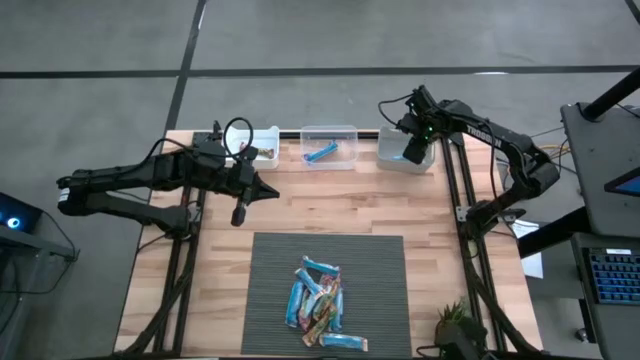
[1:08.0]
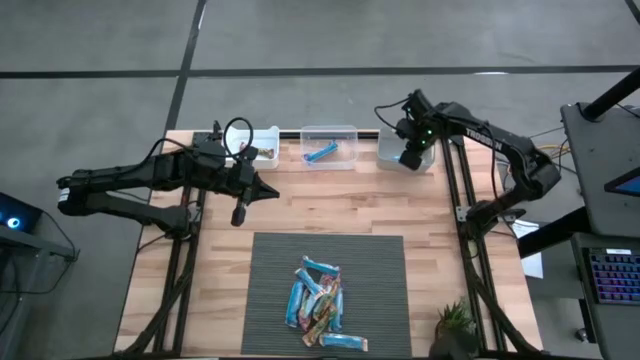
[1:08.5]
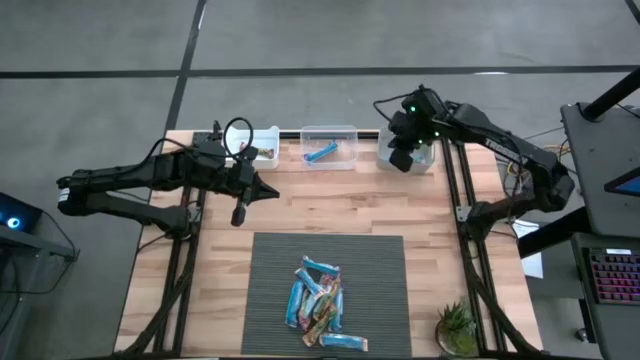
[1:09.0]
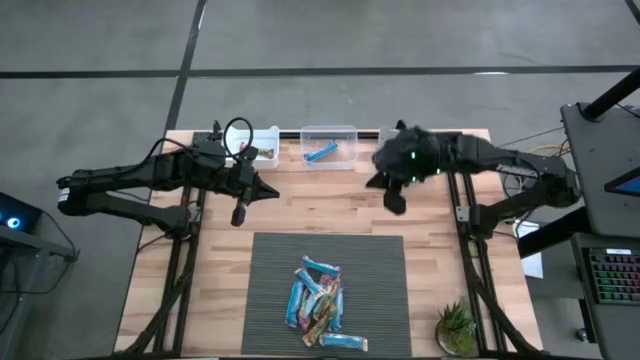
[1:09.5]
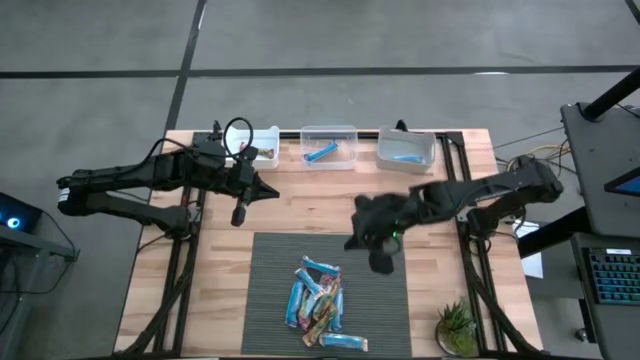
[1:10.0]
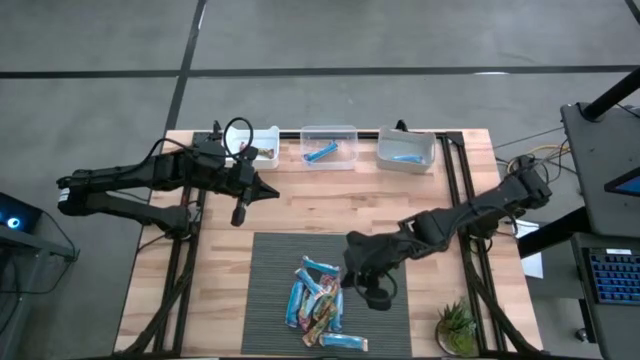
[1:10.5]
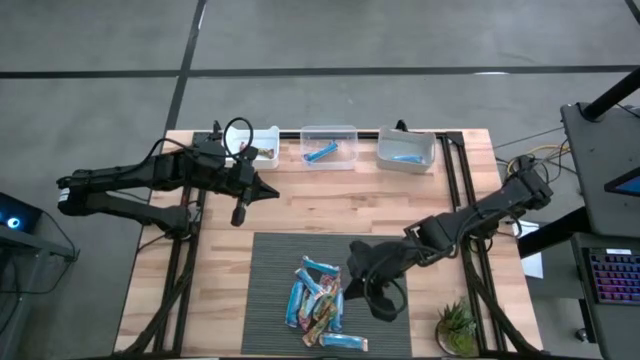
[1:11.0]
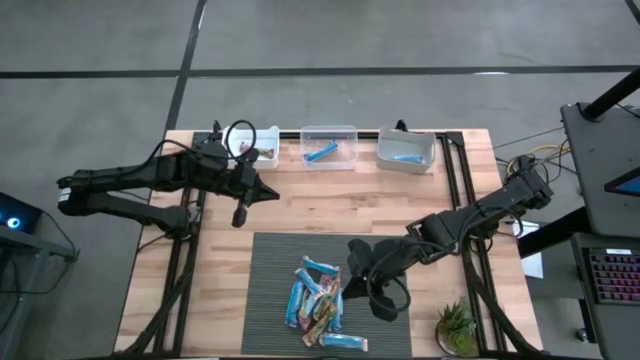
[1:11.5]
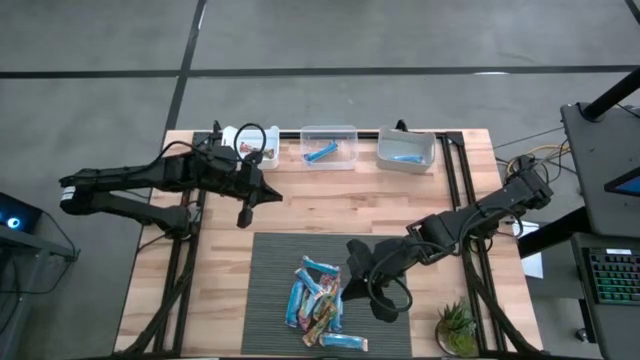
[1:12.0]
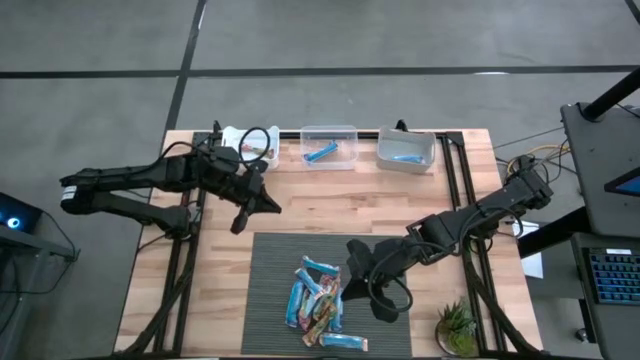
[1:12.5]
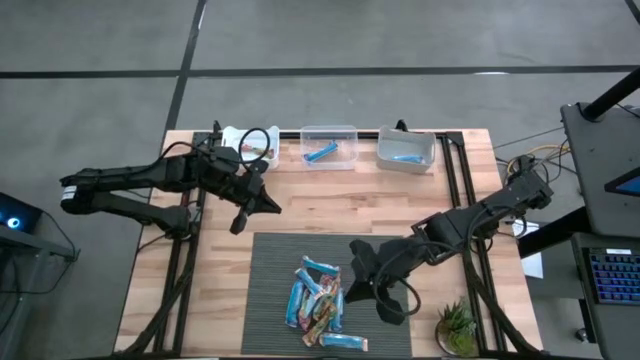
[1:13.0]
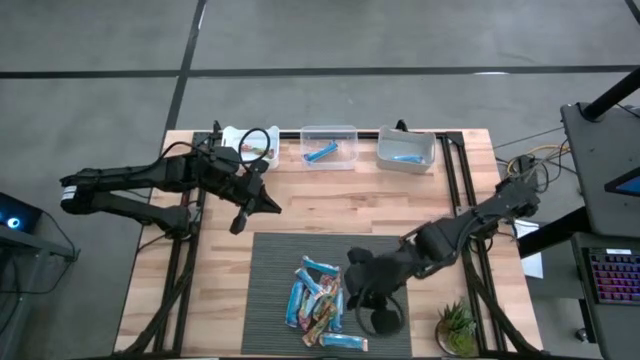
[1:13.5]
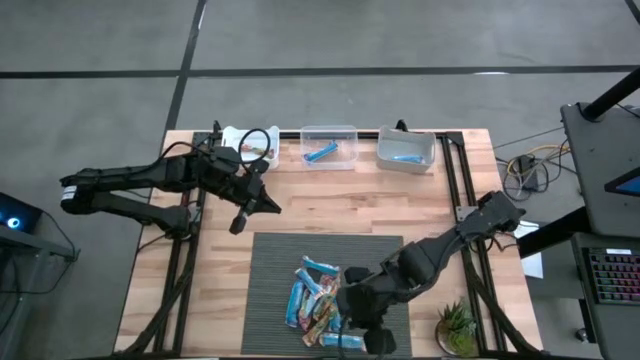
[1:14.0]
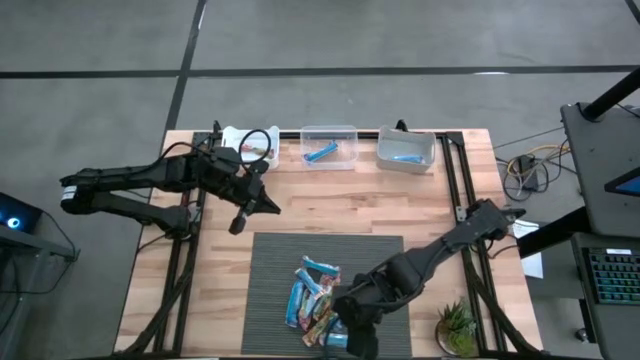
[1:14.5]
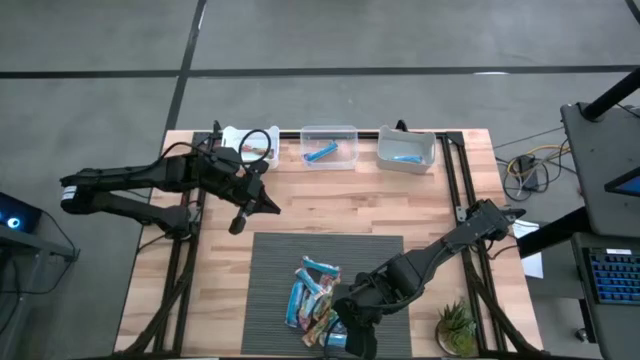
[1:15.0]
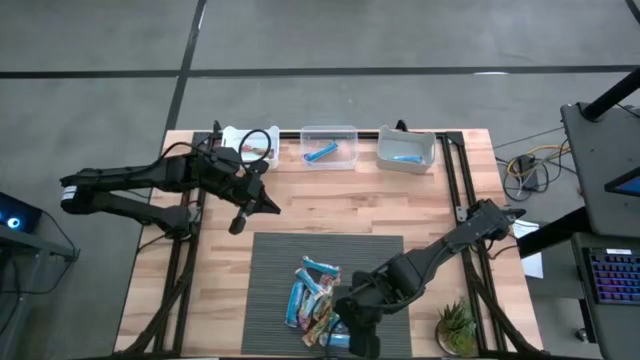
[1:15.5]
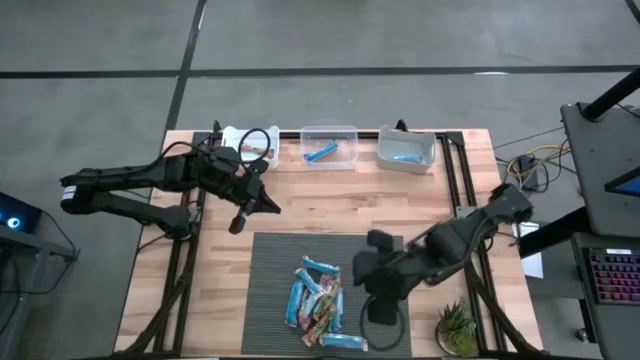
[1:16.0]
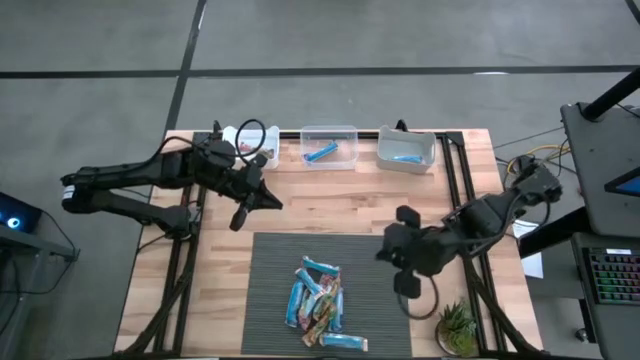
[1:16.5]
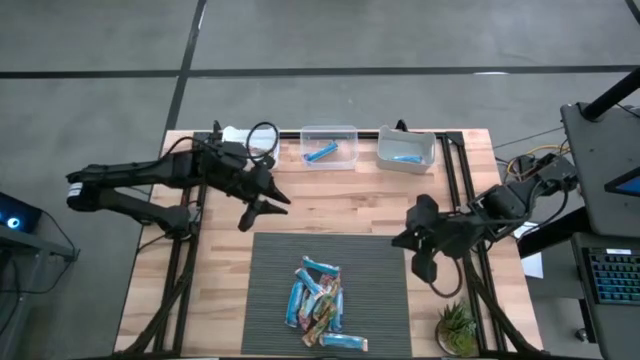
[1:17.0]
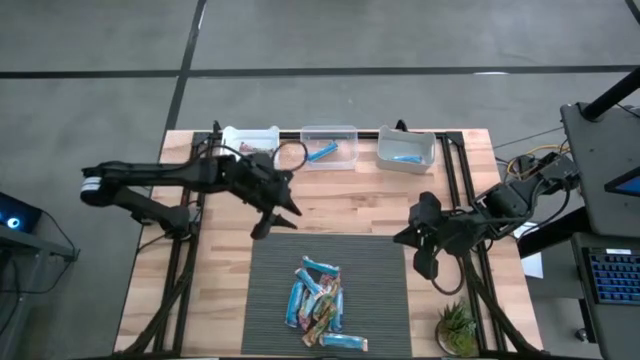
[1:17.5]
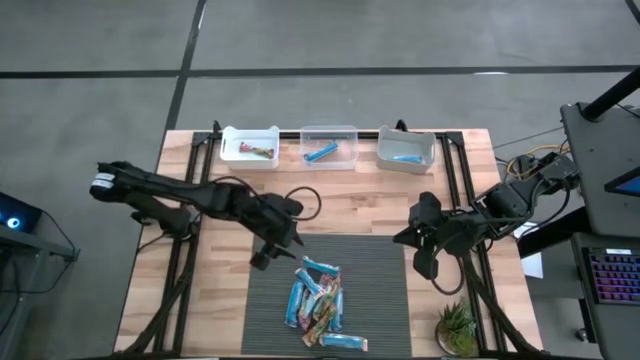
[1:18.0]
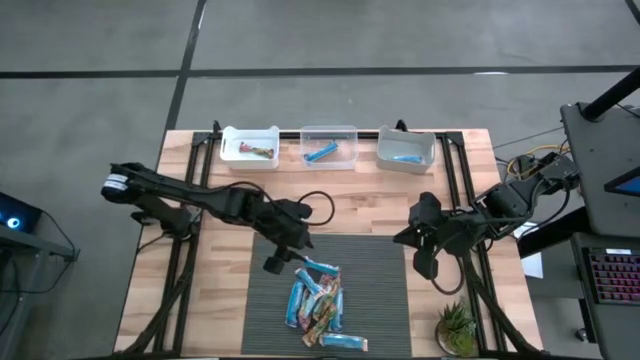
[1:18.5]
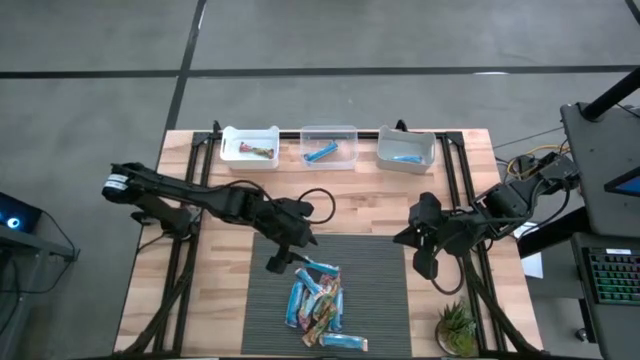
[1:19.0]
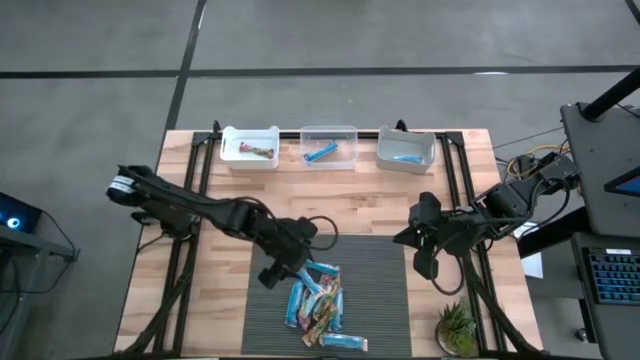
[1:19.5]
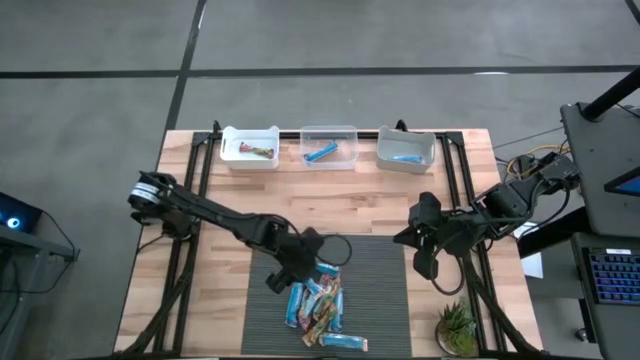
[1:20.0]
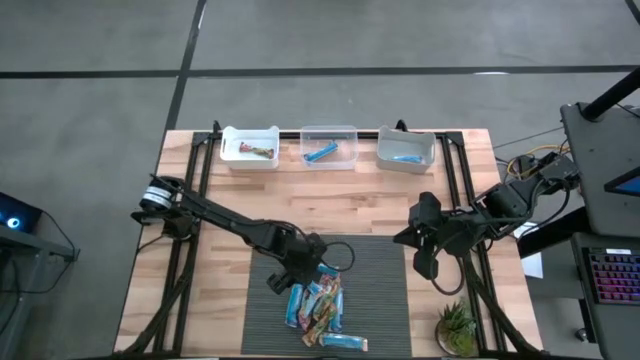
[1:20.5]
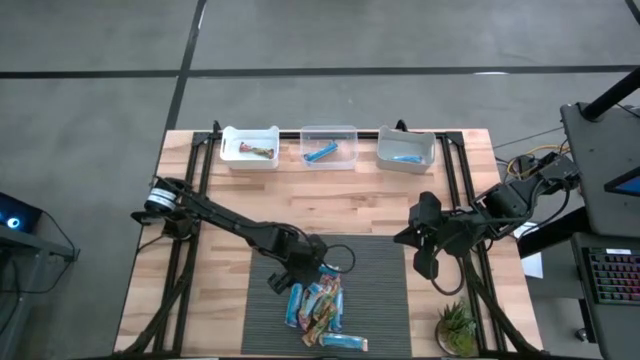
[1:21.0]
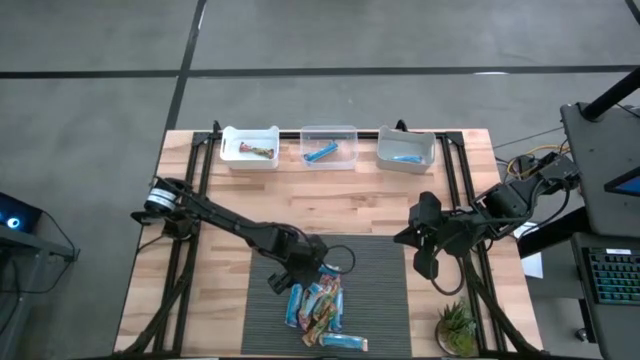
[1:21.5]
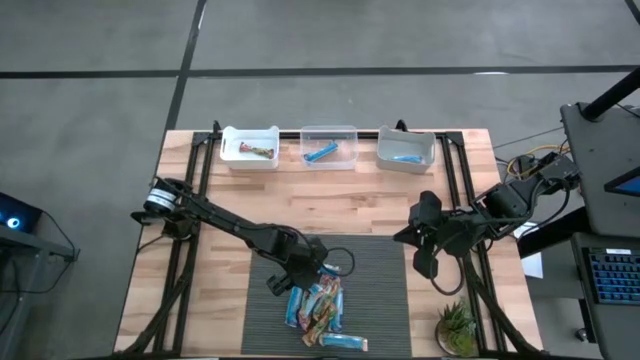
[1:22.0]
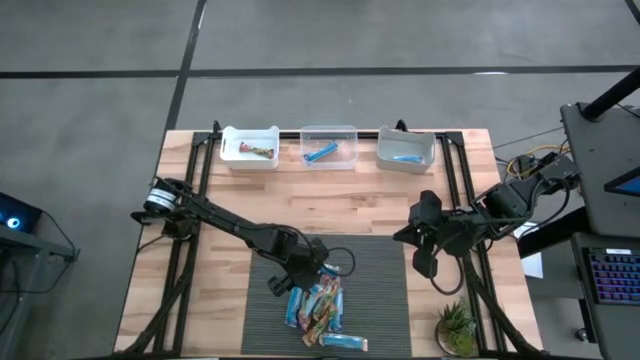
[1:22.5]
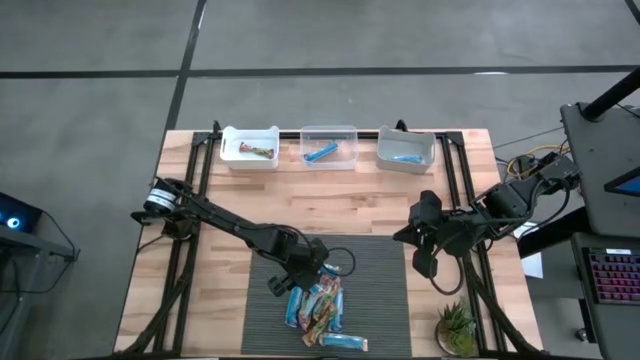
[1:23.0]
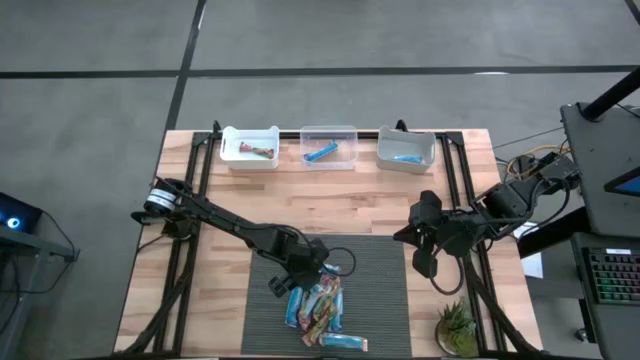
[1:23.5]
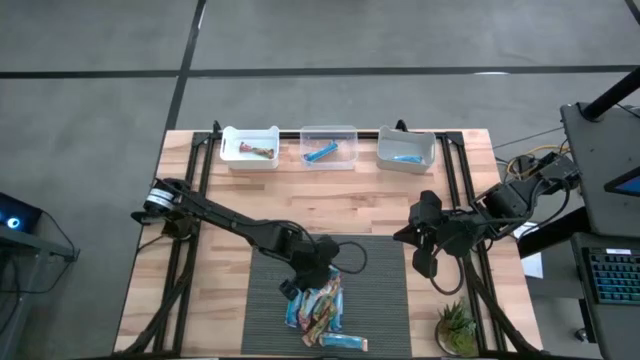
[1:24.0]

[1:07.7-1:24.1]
Task: Pick and place Granola Bars by type
Put the yellow granola bar into the gray bin

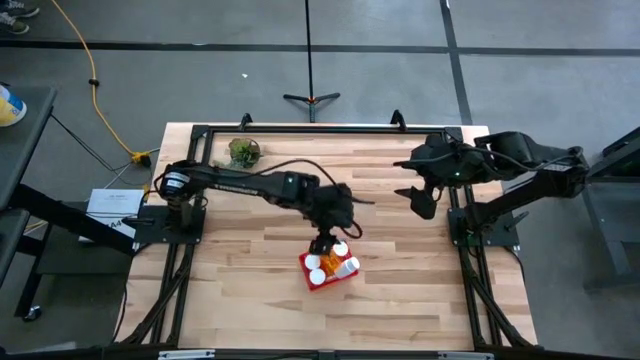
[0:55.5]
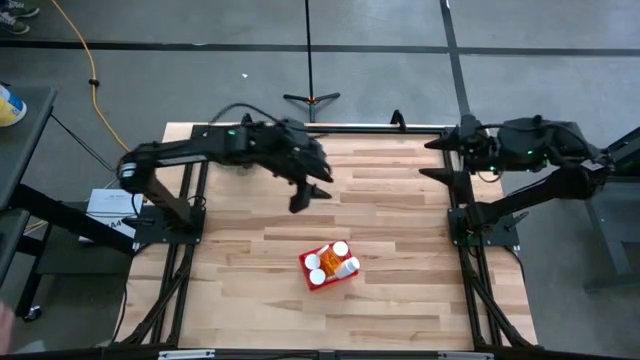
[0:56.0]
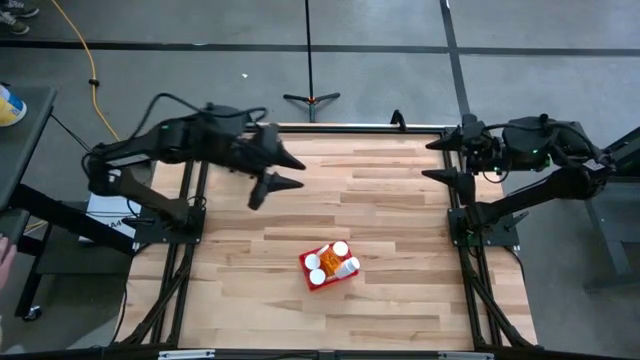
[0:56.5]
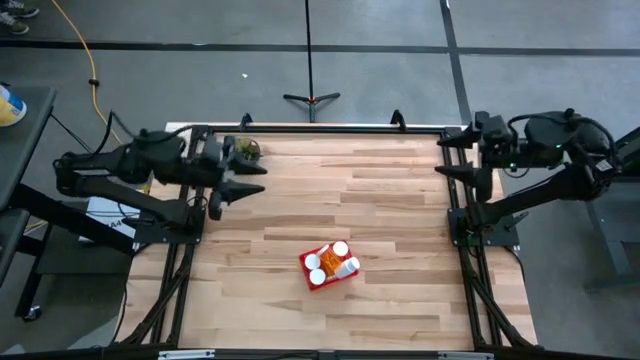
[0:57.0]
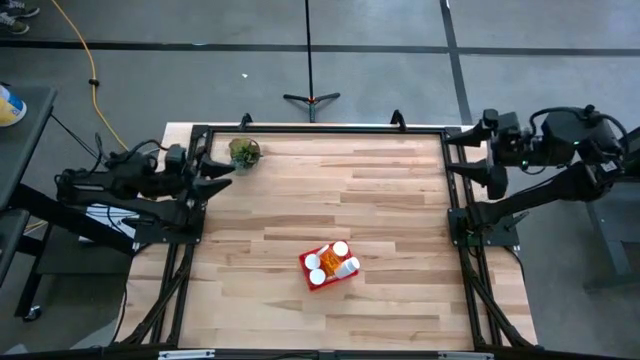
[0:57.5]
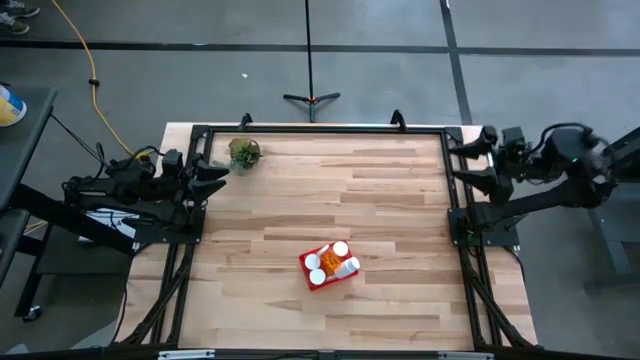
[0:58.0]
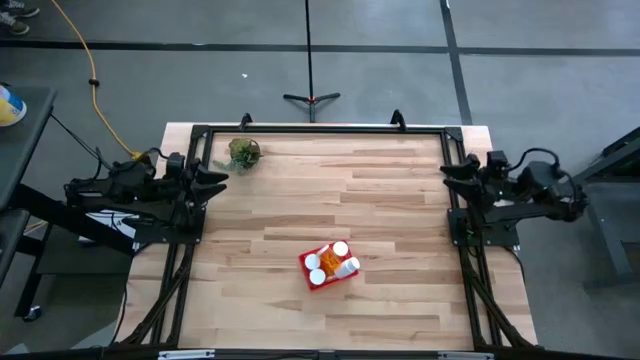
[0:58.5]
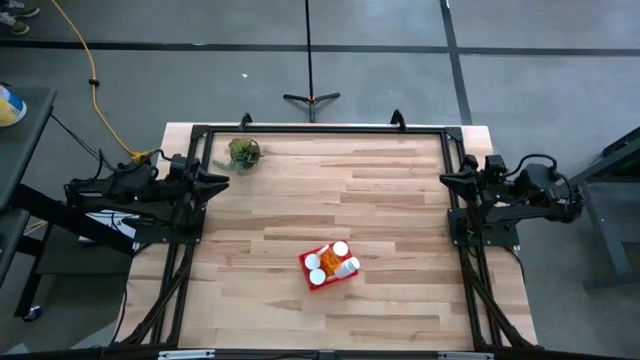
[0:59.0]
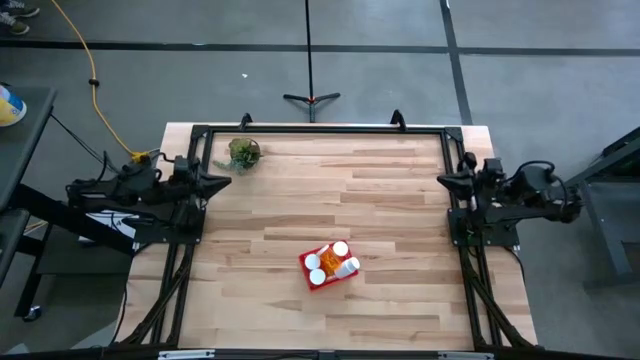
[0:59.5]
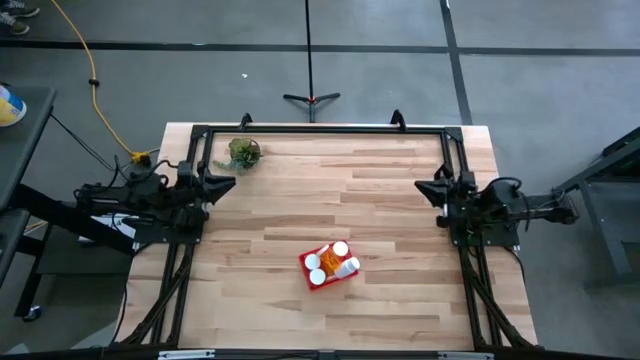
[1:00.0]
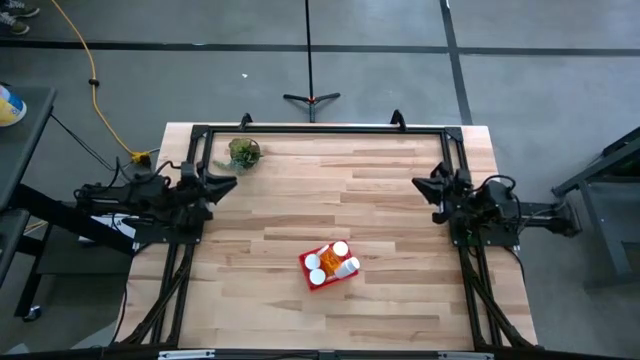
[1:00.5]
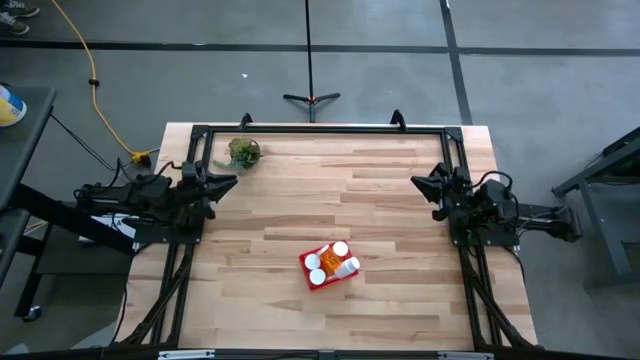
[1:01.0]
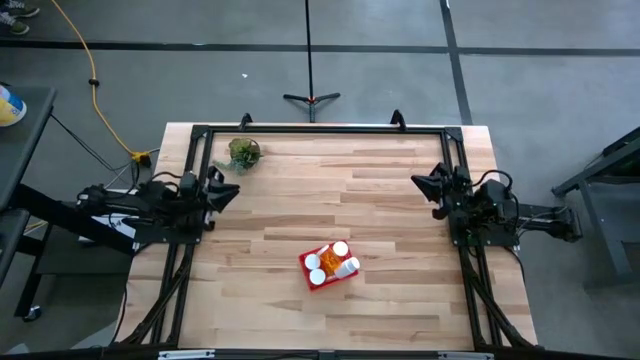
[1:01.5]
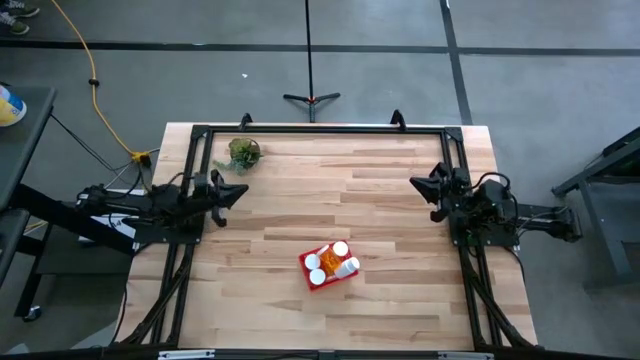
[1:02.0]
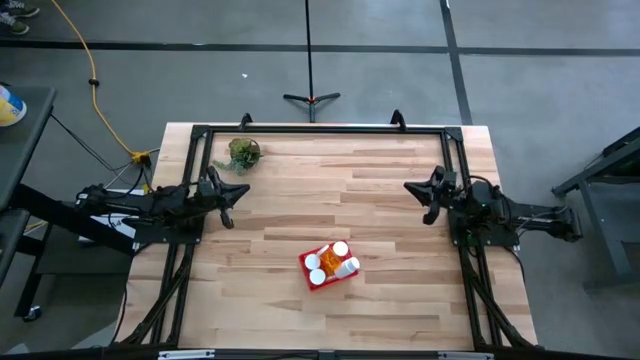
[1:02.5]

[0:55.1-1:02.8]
Task: Pick and place pill bottles into a basket
Return to Home Position
